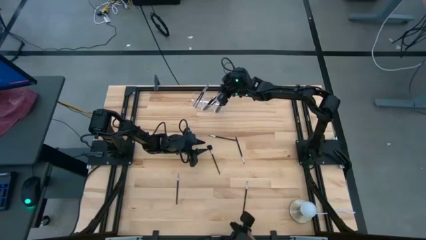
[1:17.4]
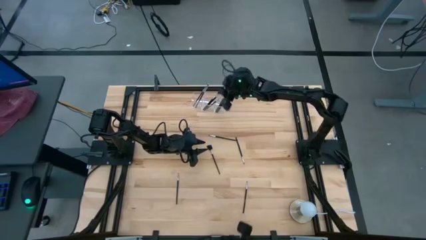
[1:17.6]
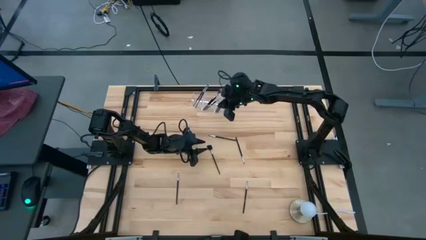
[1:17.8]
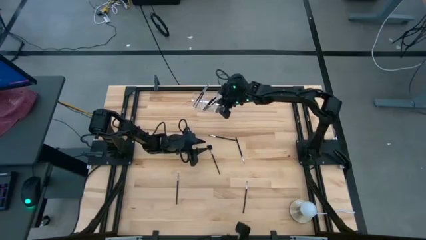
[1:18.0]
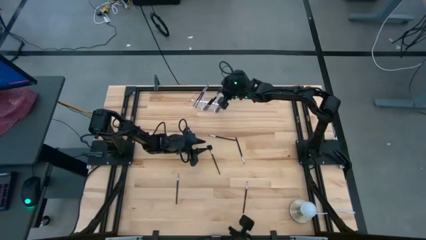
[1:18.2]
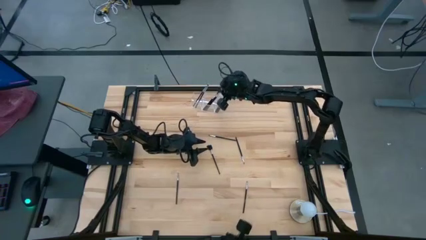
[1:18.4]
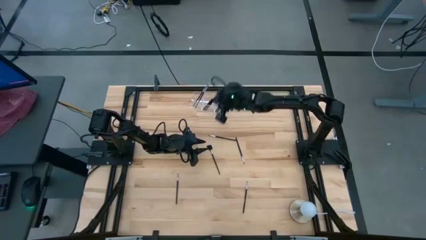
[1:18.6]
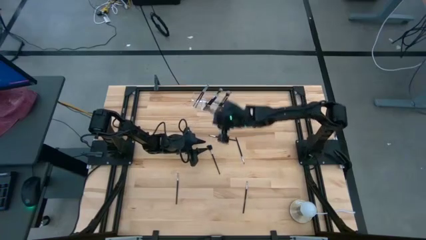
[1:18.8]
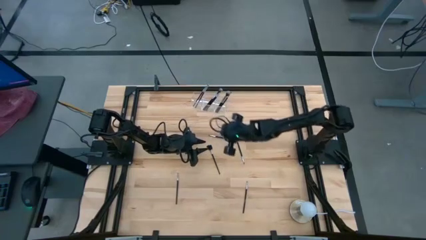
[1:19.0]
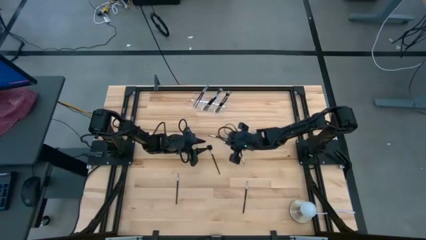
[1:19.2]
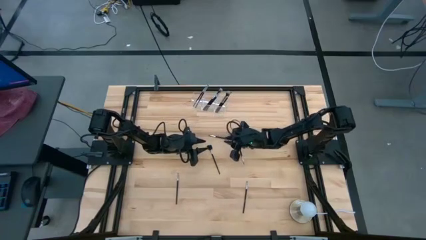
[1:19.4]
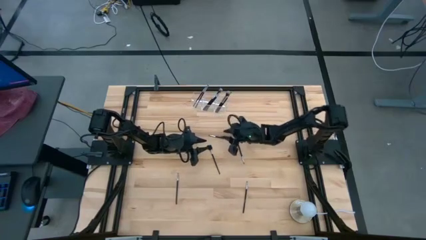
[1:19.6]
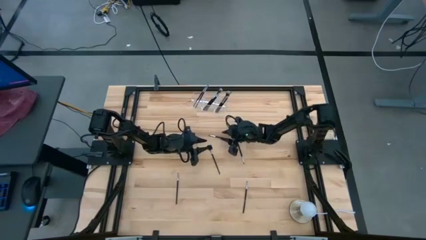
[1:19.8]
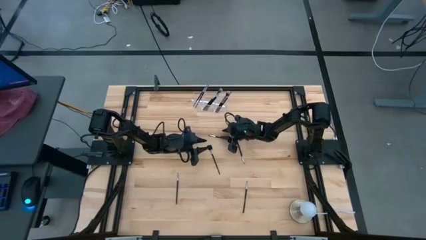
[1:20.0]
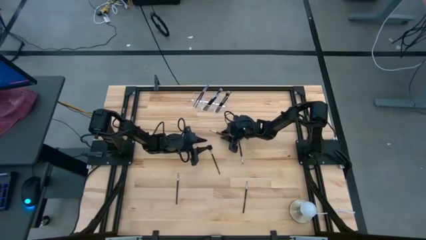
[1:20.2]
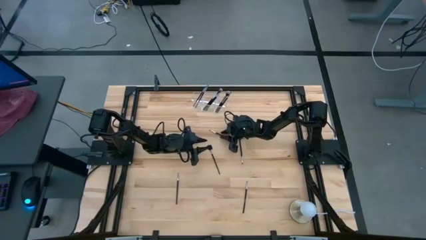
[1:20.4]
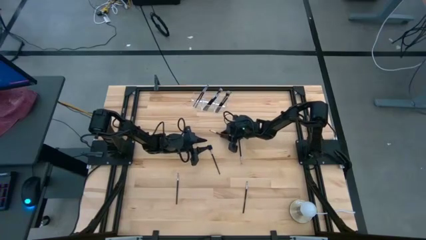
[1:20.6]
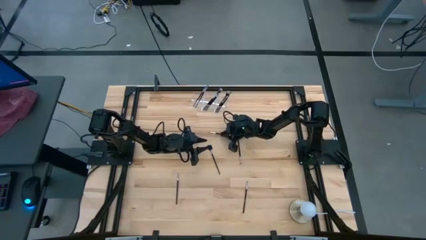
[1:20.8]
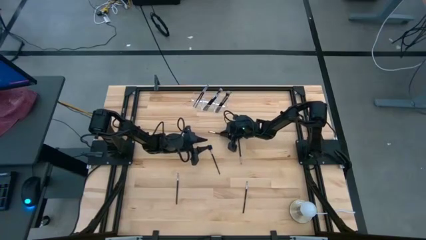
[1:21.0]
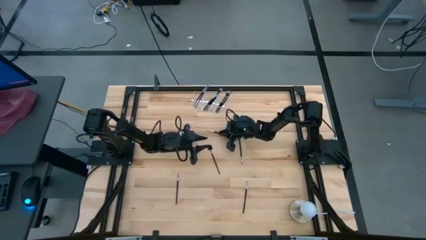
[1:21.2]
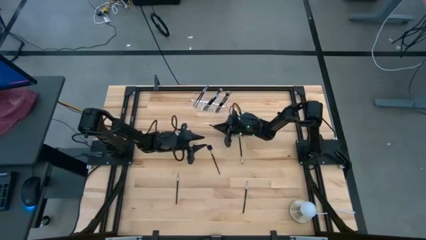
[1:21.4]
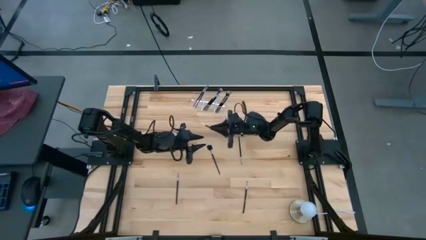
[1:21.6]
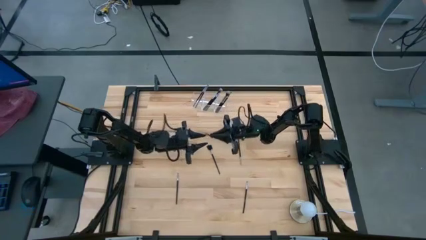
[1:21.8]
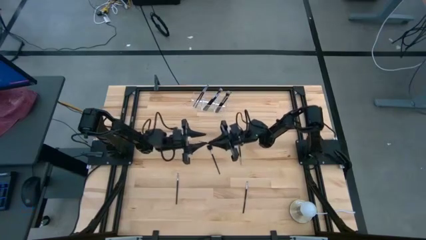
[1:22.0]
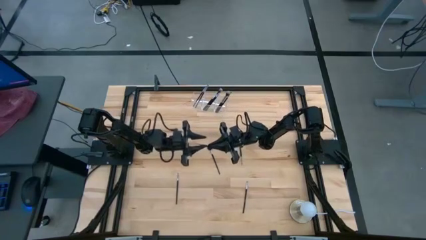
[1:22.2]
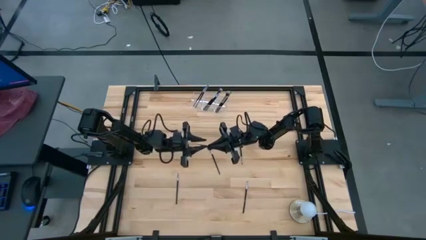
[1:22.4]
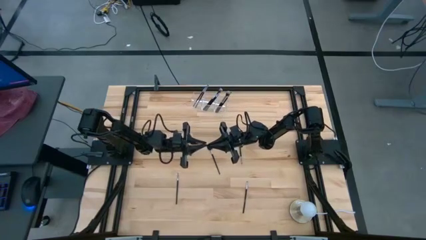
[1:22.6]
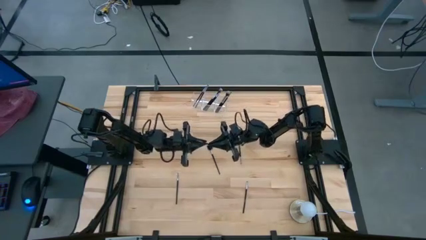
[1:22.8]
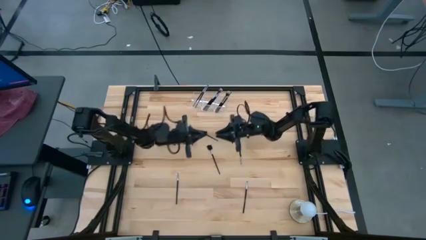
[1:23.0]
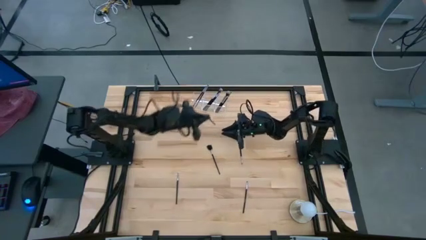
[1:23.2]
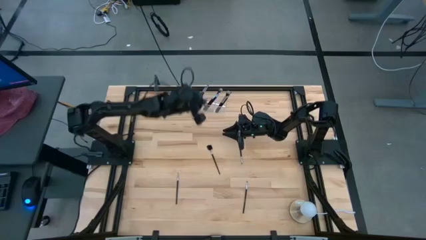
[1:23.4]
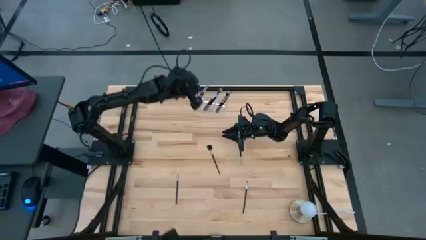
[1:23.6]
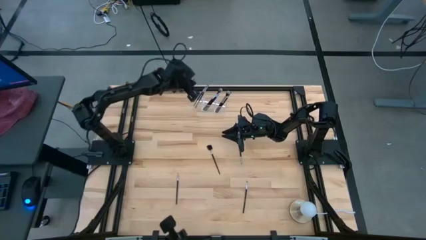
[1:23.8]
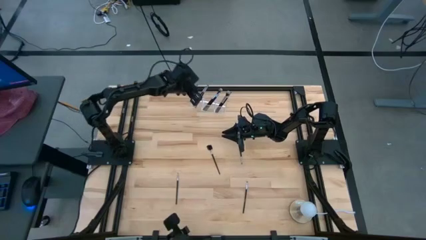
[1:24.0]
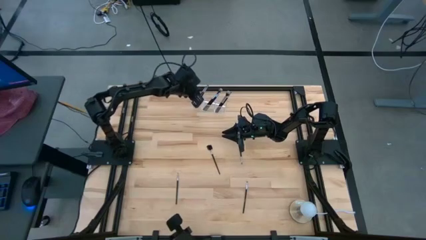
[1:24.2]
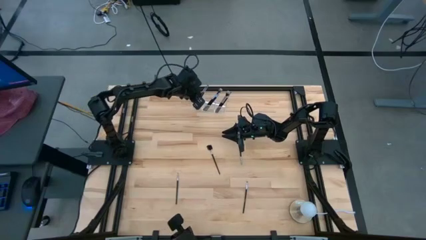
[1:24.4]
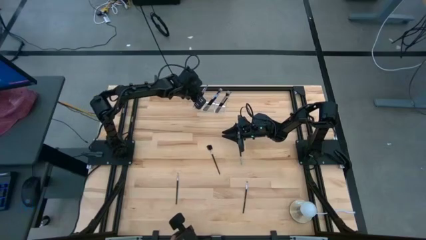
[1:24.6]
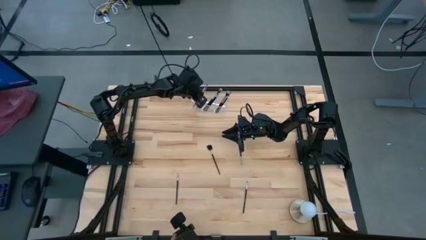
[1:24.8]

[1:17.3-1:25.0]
Task: Put items in baskets/containers
Put the black eyeshadow brush into the transparent organizer

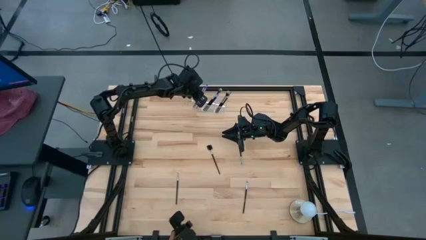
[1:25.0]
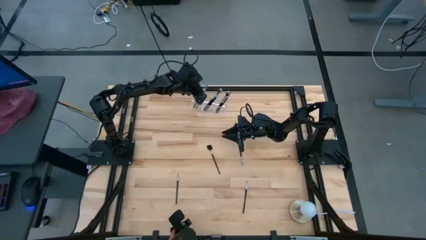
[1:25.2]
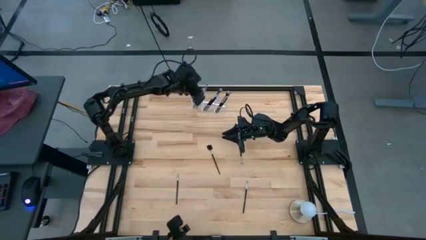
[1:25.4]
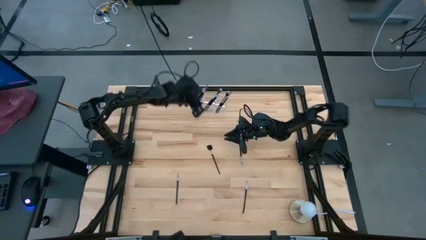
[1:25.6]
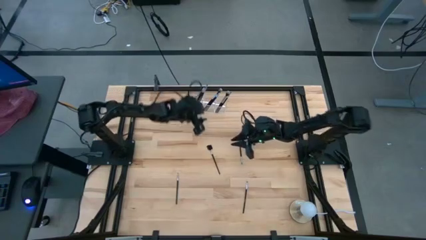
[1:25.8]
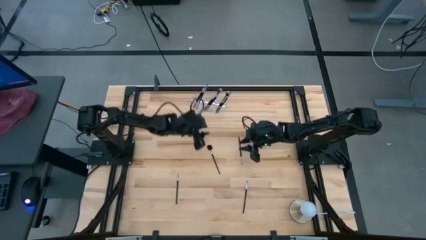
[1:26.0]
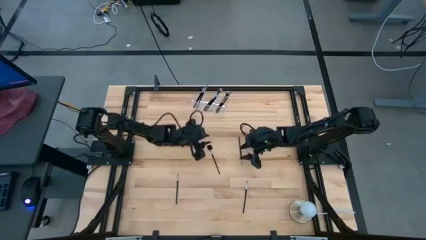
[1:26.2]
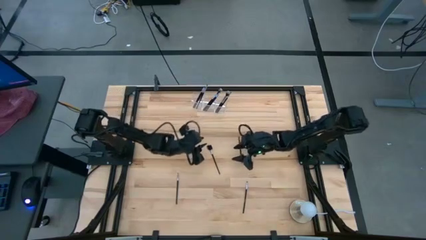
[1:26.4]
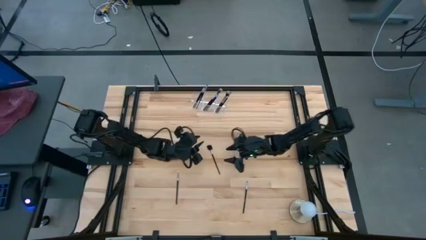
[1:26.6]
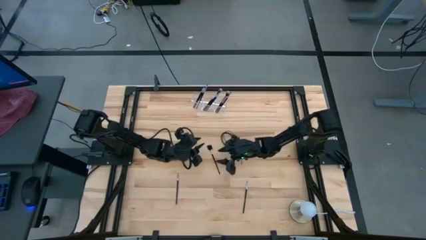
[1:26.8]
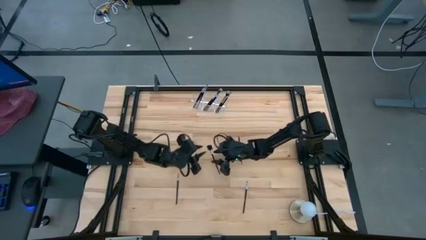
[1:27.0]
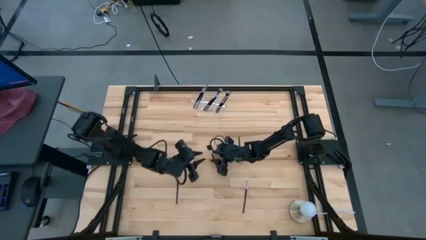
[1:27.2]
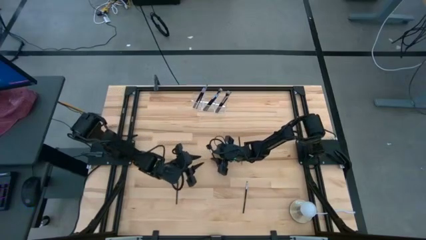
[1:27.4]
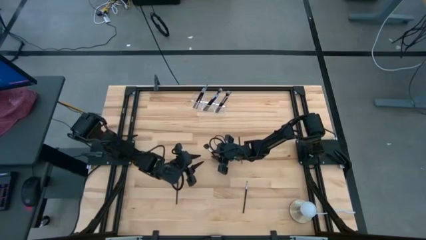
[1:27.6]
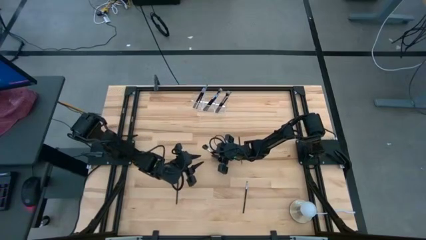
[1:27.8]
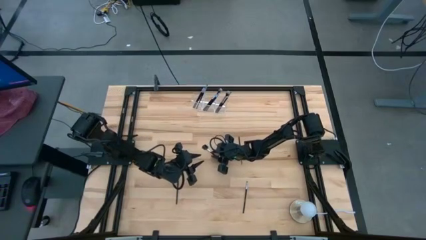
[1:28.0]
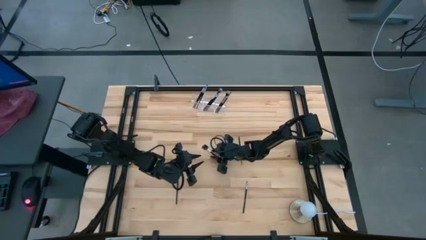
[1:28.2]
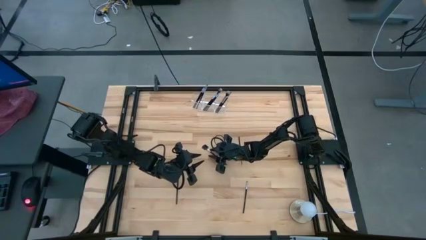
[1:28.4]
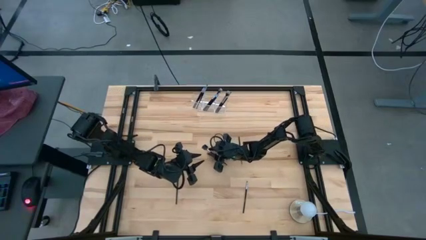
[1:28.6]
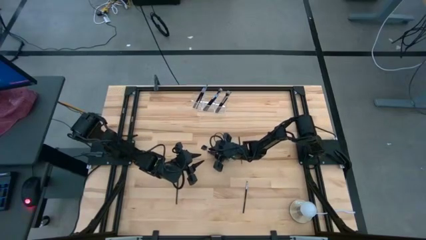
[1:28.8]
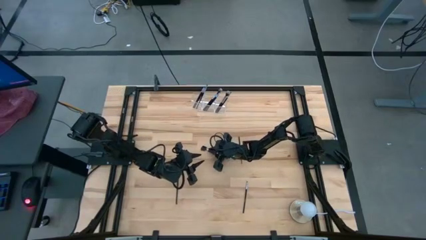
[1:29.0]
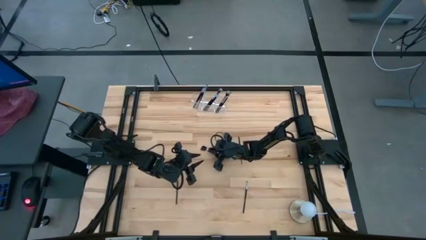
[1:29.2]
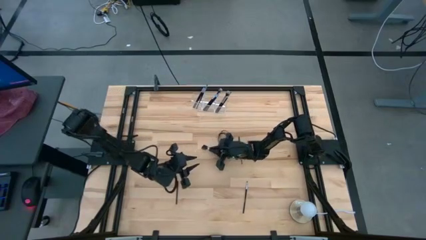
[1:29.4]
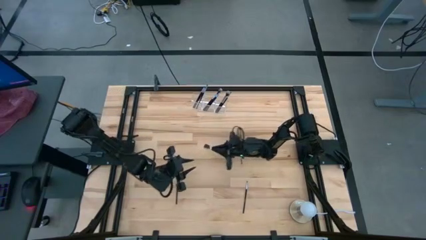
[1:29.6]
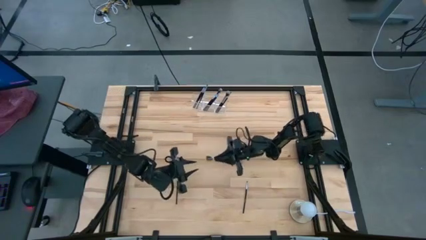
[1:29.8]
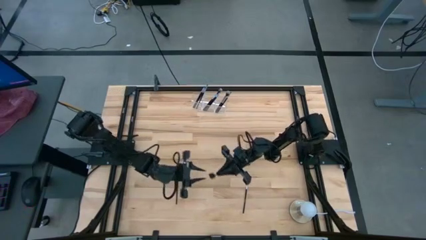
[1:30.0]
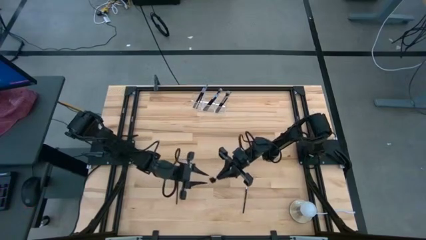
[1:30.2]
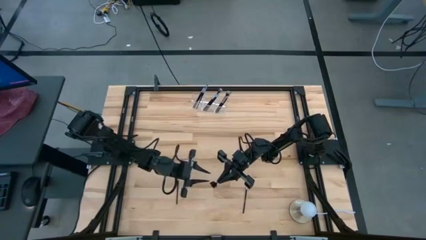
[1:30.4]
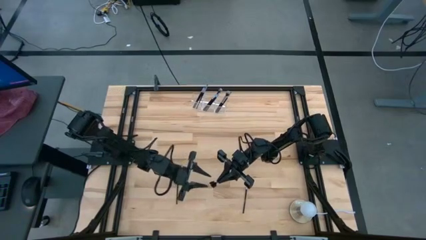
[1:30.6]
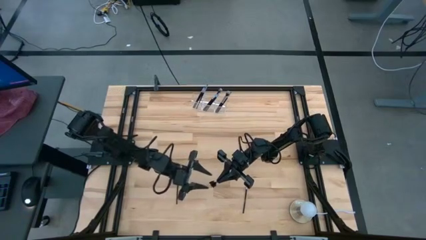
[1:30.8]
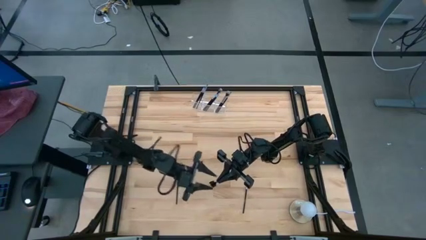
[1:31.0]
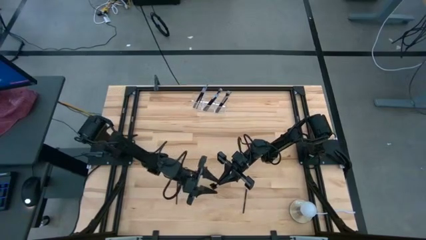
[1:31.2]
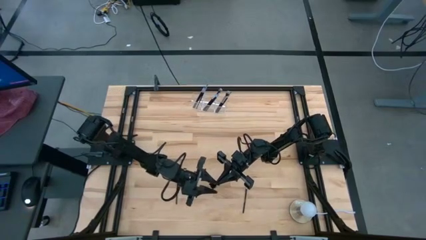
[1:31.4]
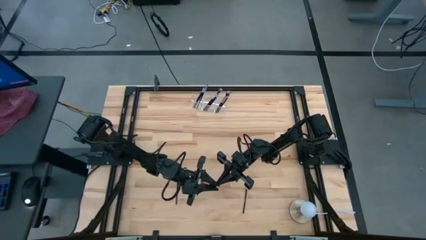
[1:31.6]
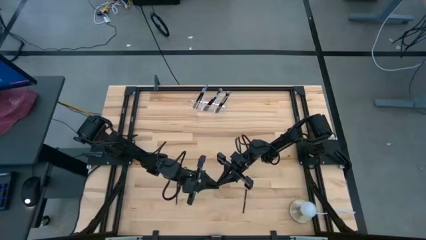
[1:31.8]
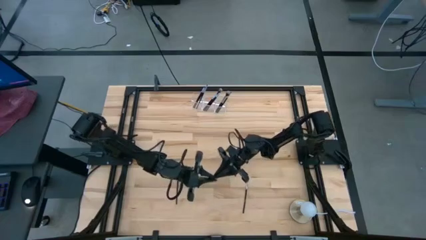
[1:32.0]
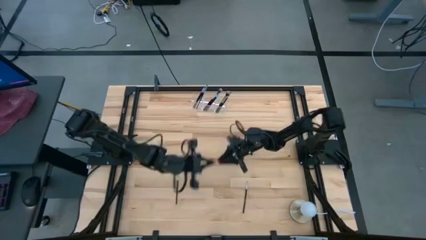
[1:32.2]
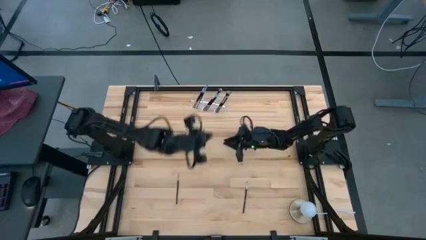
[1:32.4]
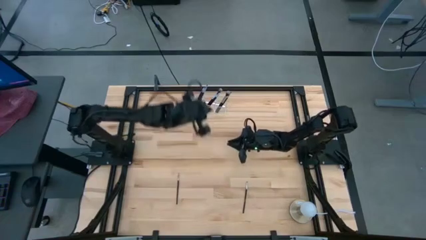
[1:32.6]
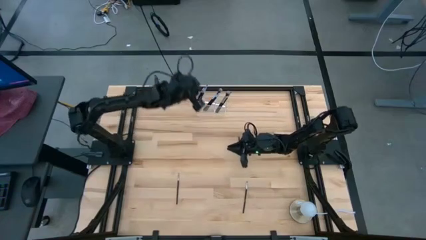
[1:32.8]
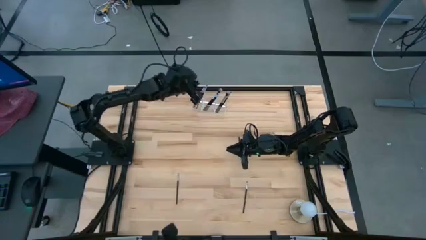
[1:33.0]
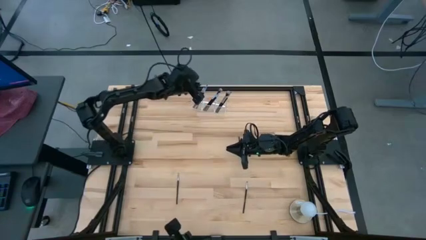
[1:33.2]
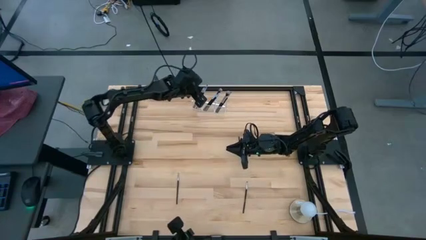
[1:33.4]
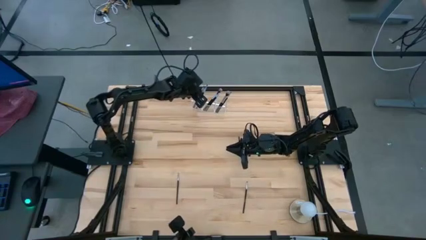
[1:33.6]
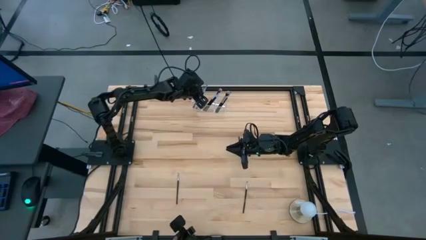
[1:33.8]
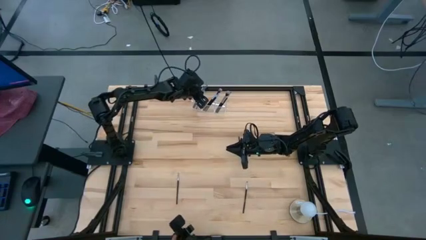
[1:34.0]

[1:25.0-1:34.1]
Put the black brow brush into the transparent organizer
